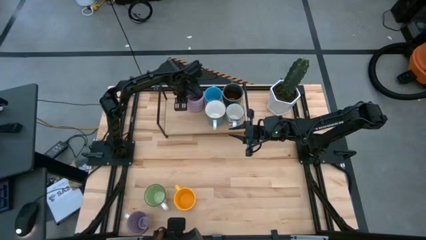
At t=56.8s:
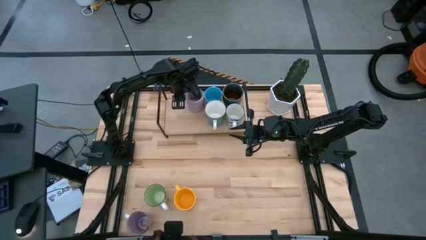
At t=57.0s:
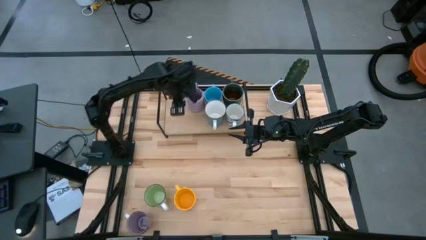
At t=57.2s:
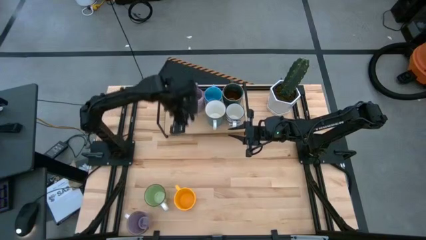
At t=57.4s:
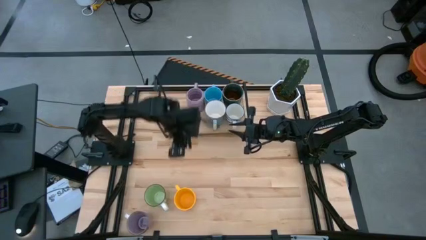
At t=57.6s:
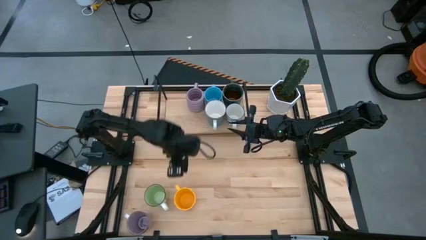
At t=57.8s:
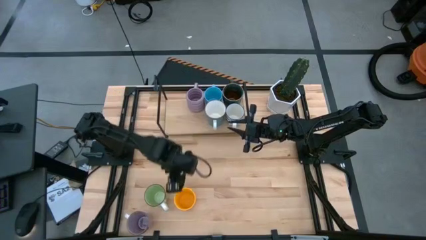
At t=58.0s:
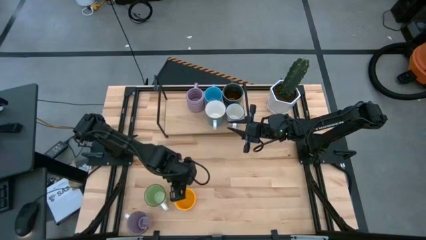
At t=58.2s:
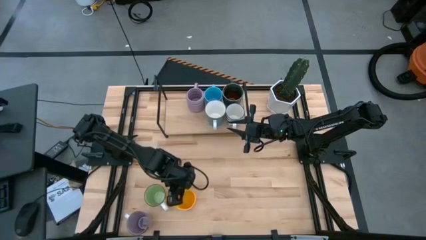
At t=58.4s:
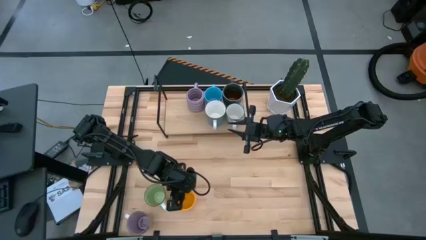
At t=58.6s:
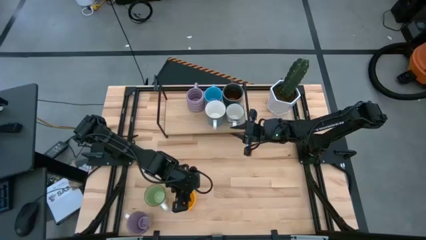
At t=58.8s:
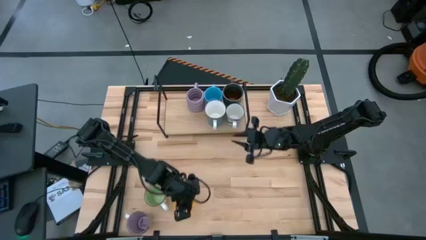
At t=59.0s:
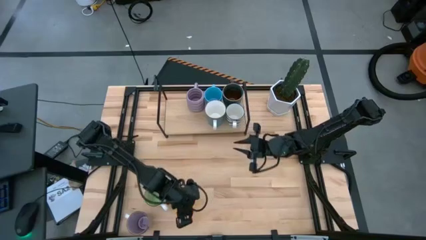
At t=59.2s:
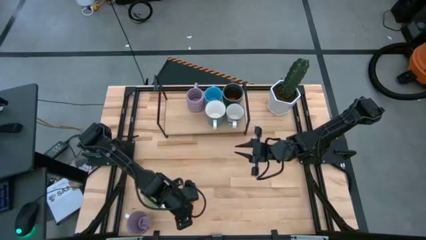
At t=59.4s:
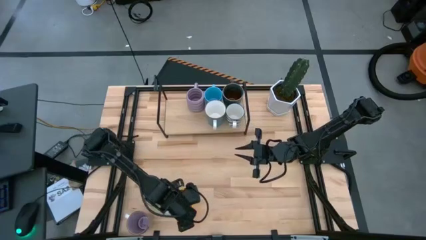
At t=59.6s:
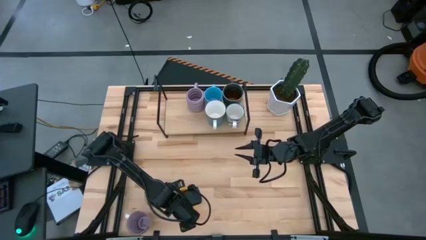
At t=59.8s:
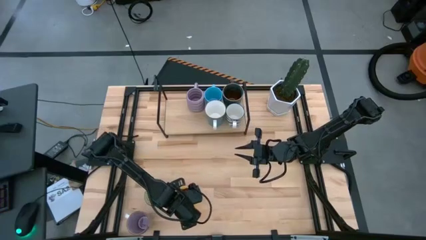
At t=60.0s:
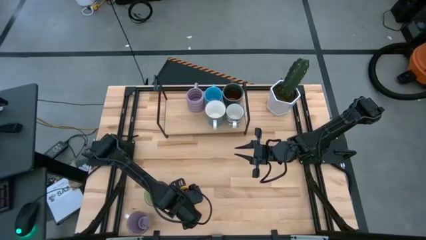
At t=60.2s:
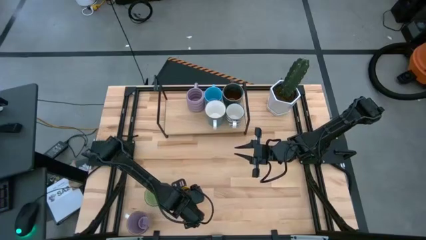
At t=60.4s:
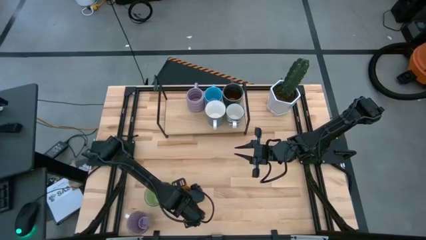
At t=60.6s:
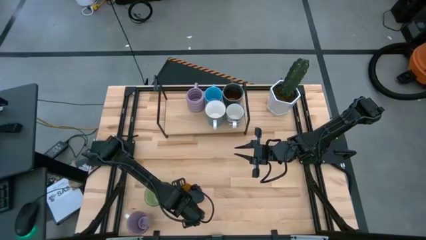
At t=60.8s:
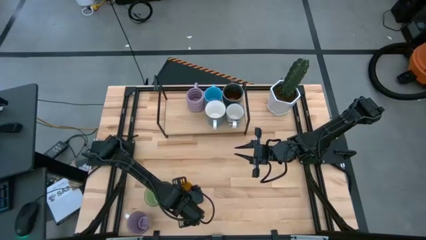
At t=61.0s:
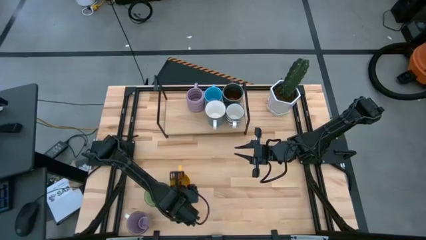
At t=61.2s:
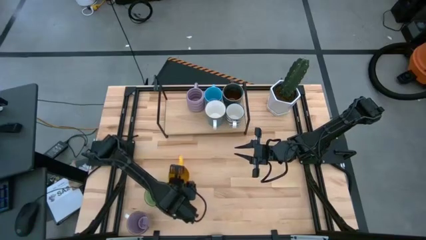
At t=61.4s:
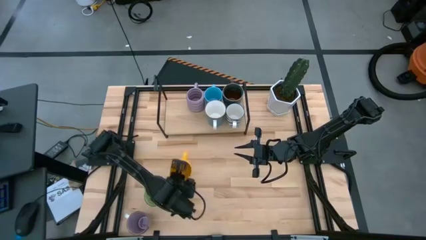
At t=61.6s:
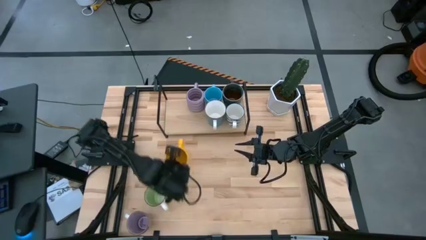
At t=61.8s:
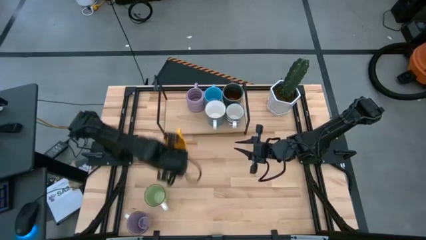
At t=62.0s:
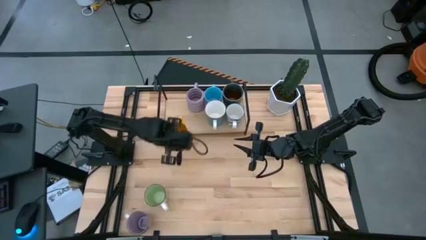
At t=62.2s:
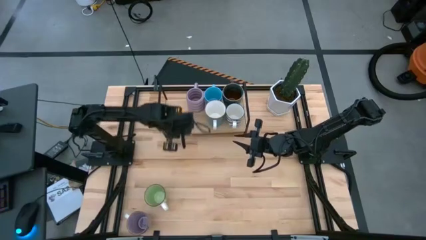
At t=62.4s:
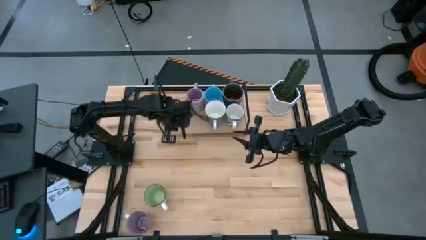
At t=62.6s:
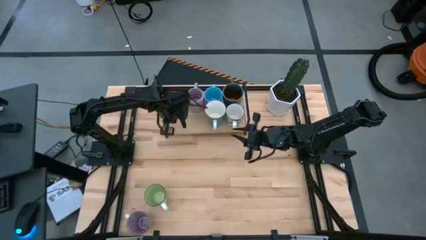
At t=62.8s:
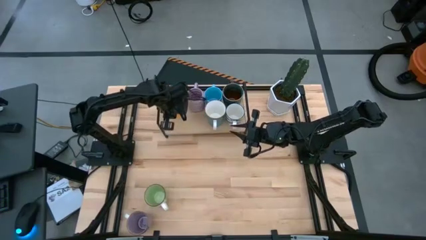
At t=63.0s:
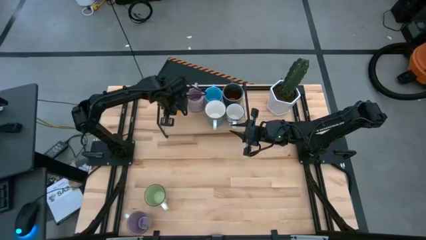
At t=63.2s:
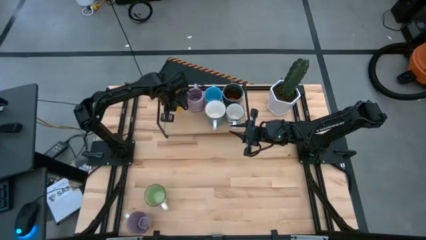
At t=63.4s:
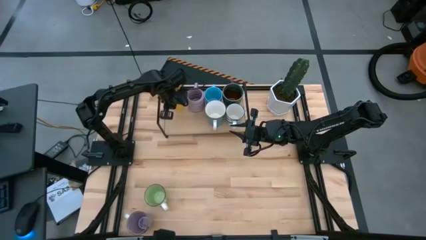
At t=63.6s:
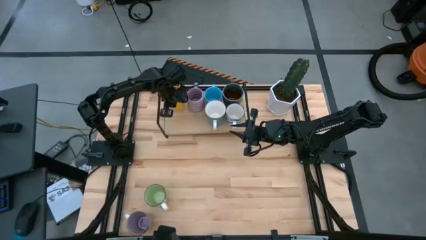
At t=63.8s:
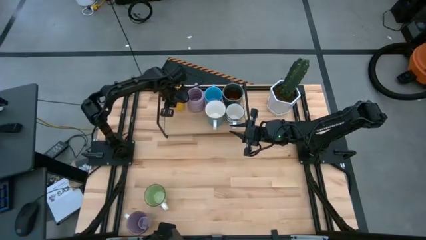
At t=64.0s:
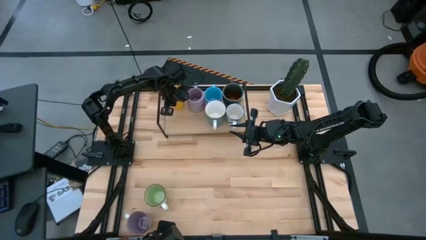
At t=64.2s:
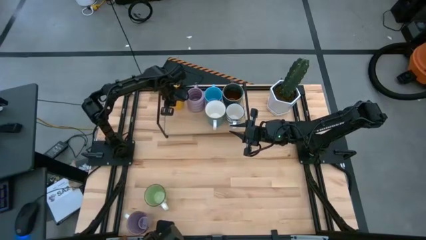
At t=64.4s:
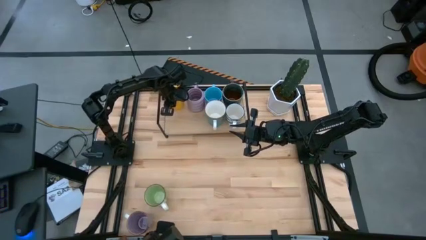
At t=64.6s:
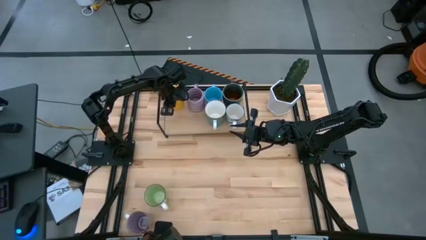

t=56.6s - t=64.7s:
Task: Place coffee mugs
Put the yellow mug on the shelf

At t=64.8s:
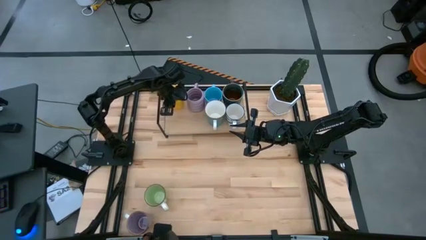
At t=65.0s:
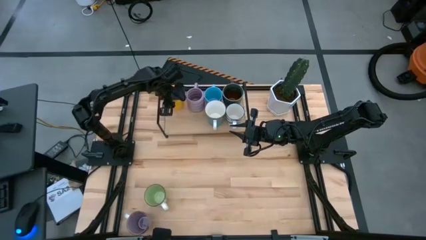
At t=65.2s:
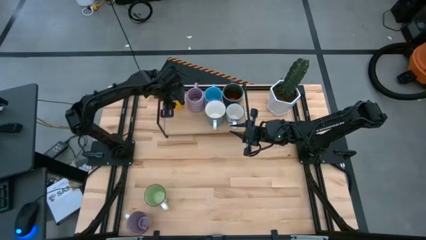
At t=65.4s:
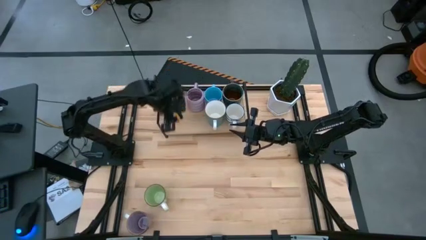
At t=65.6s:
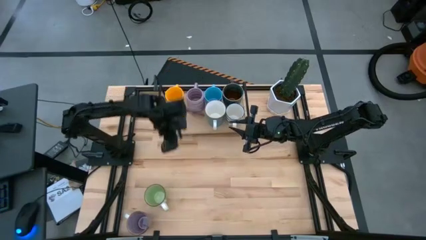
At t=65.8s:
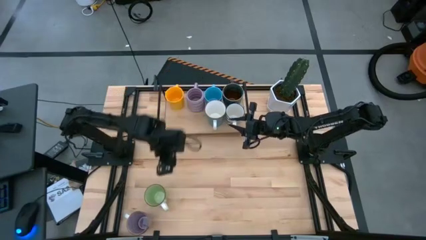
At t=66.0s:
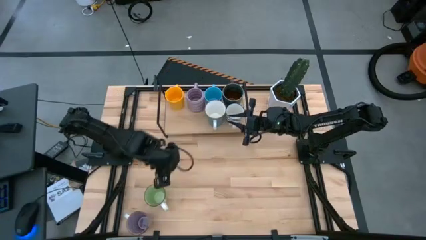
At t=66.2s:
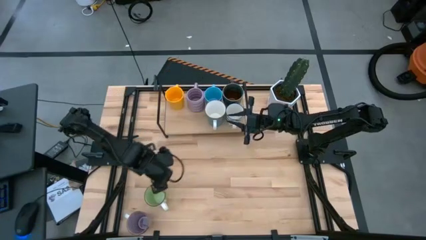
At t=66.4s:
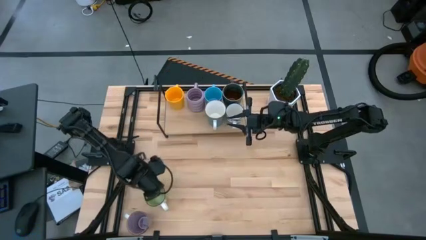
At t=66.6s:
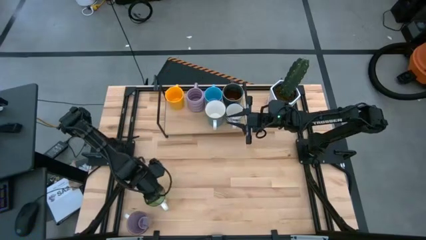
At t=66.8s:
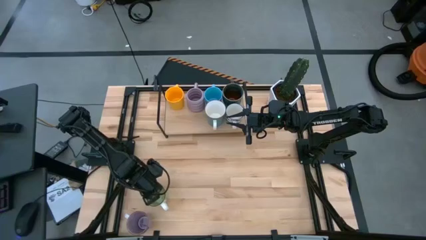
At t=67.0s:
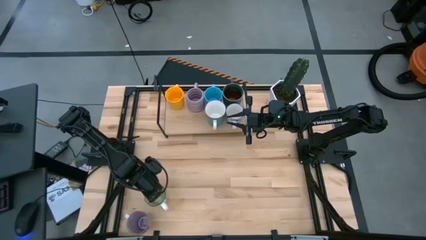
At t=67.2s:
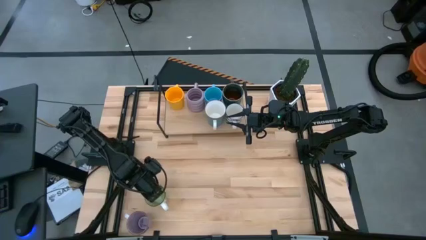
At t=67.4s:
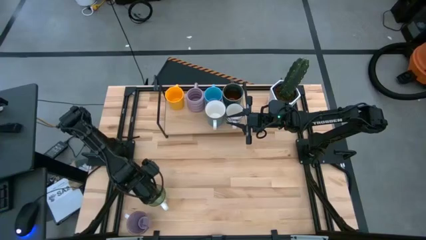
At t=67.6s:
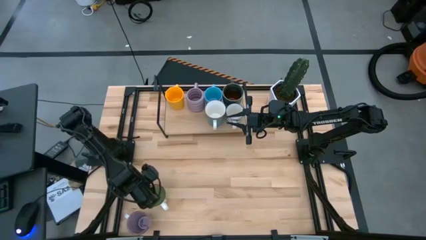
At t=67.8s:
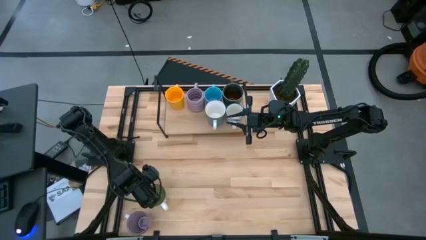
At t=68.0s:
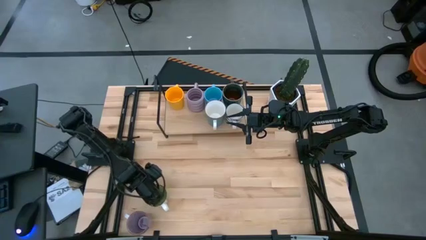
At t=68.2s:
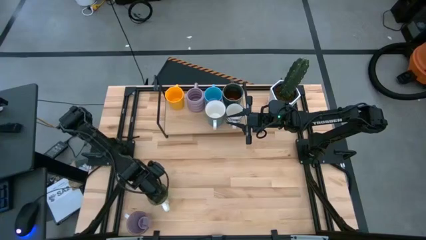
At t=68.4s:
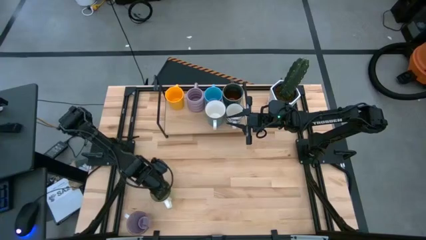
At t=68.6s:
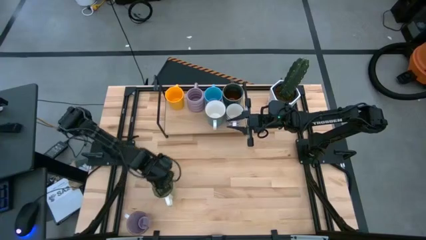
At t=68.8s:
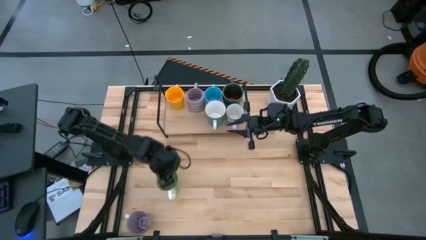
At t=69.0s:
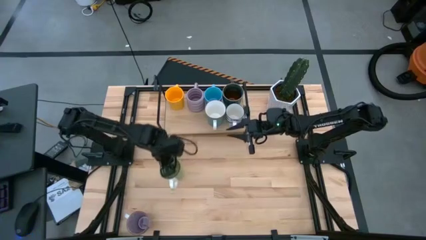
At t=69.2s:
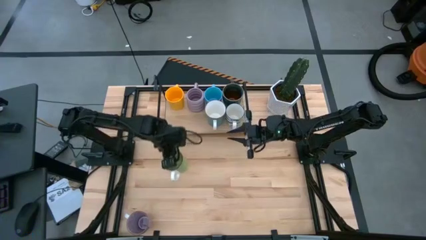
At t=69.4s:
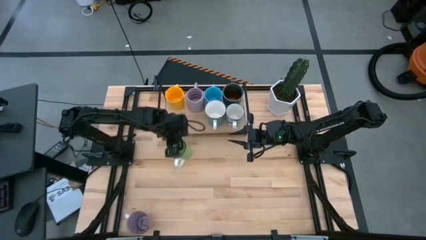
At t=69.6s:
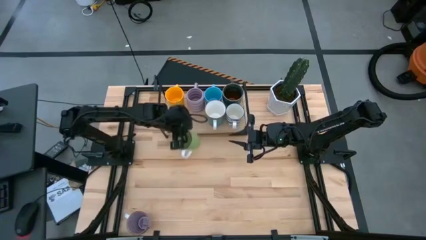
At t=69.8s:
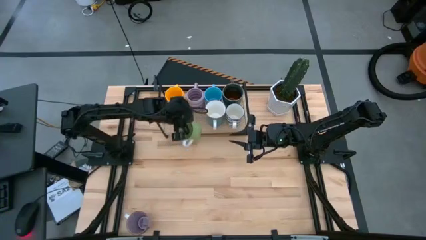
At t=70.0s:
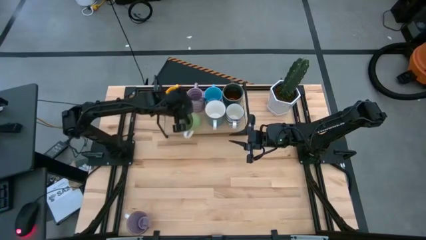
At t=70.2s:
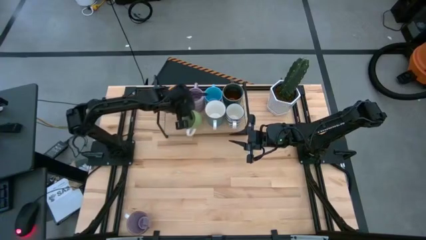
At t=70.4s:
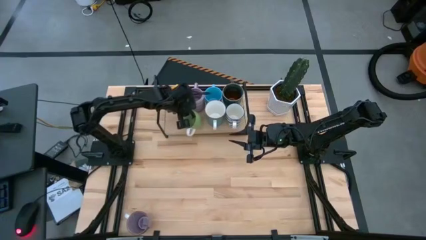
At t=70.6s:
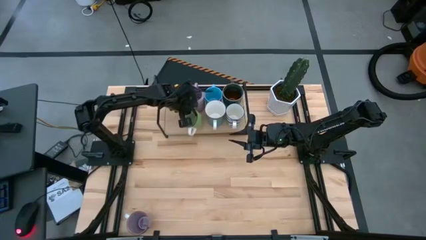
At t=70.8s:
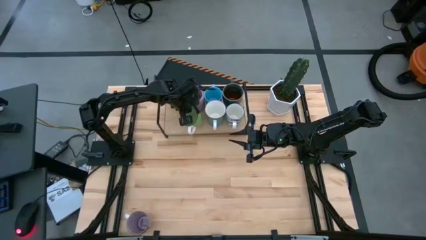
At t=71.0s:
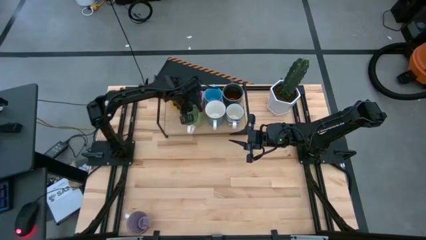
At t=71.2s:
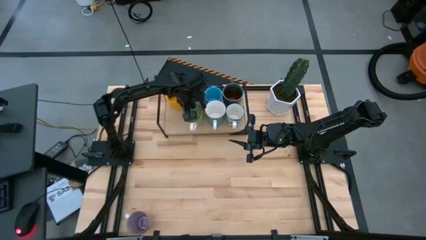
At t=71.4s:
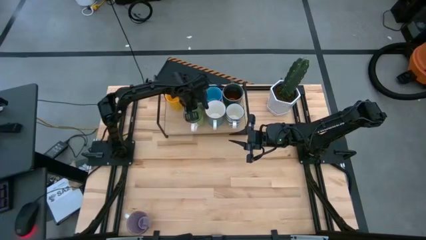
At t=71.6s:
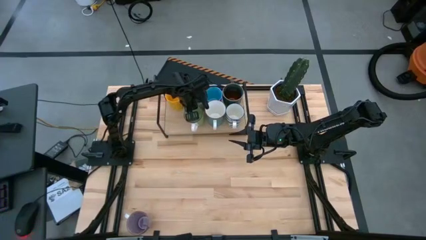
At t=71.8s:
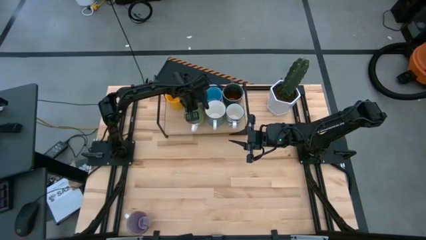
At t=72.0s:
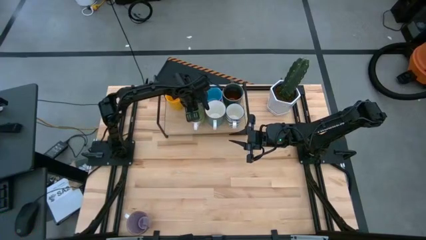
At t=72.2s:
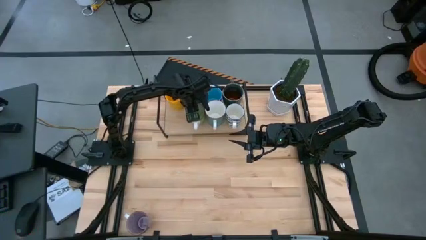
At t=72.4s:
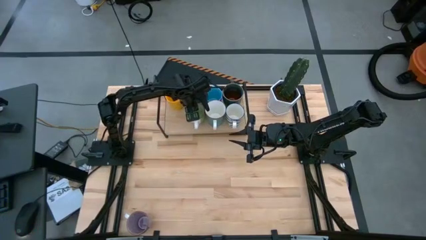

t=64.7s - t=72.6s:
Put the light green mug on the shelf
